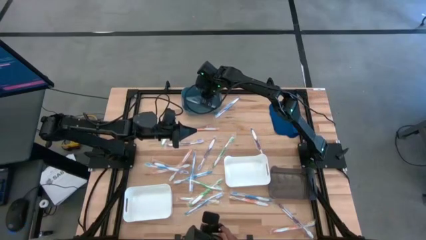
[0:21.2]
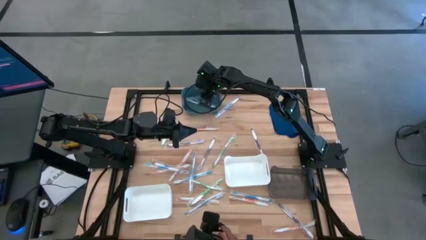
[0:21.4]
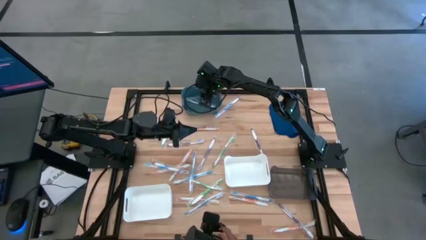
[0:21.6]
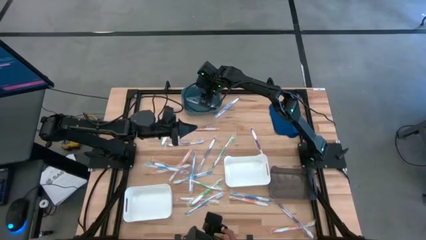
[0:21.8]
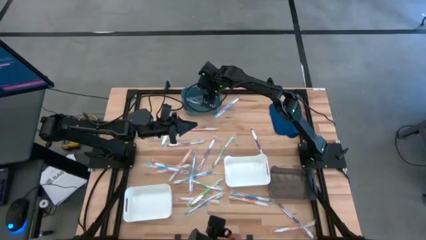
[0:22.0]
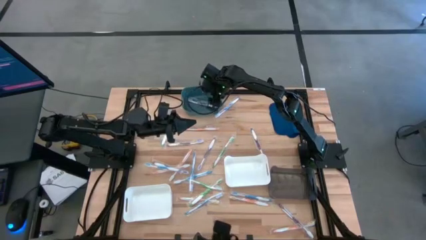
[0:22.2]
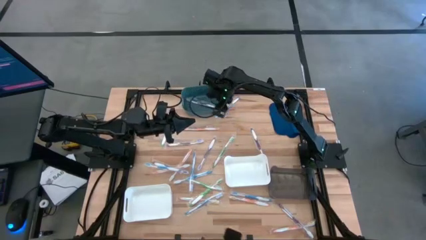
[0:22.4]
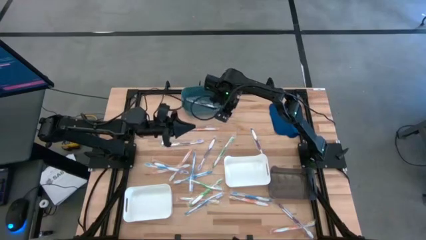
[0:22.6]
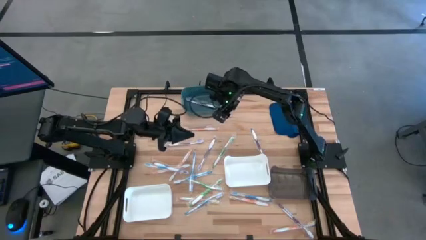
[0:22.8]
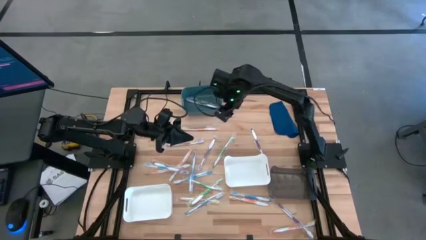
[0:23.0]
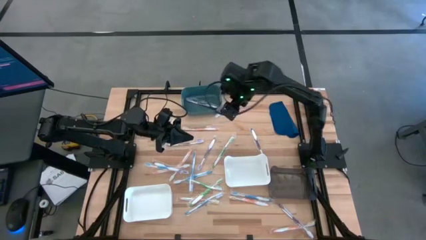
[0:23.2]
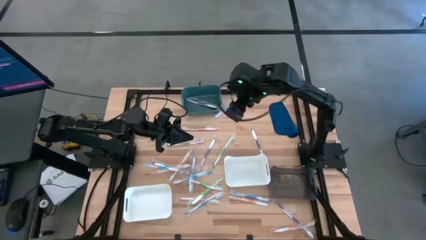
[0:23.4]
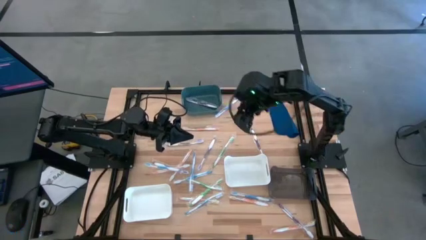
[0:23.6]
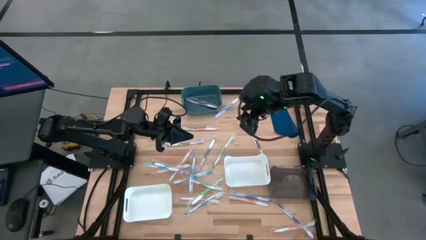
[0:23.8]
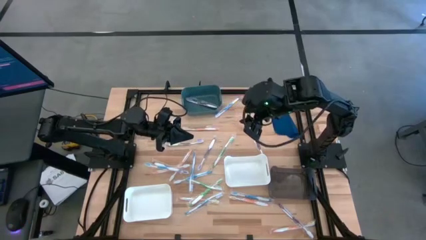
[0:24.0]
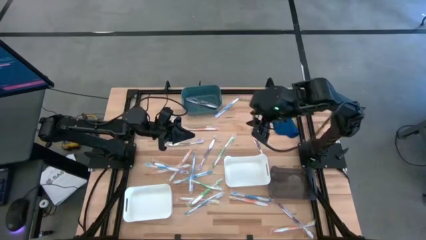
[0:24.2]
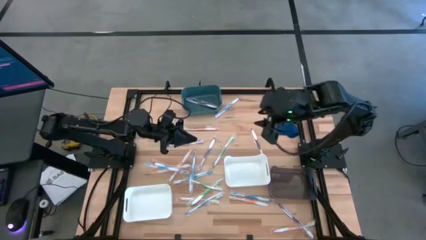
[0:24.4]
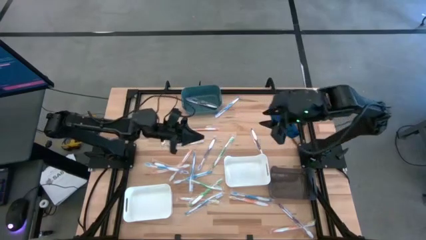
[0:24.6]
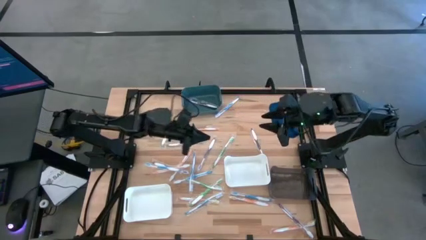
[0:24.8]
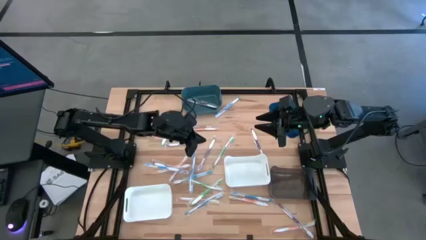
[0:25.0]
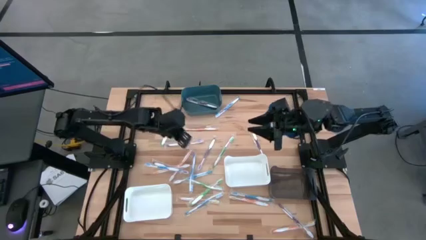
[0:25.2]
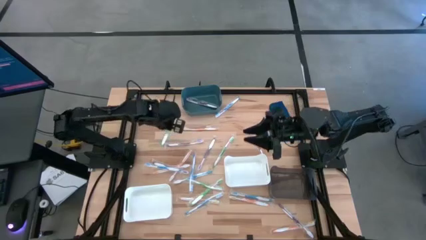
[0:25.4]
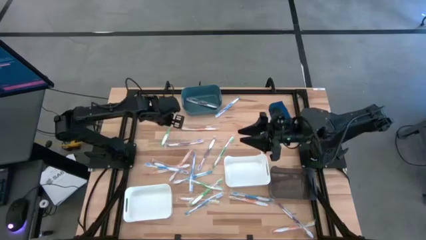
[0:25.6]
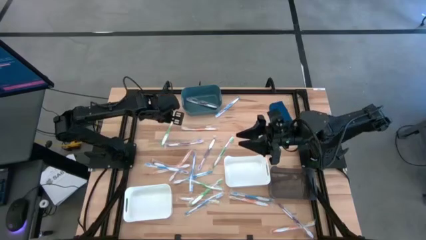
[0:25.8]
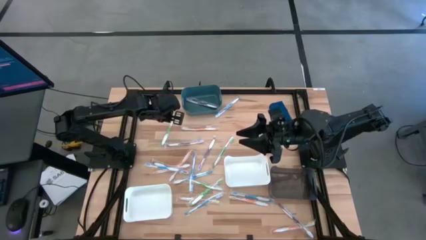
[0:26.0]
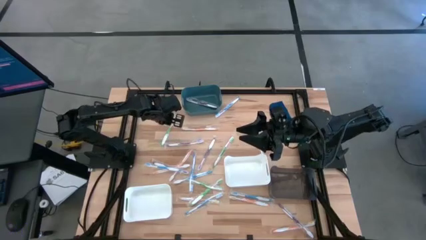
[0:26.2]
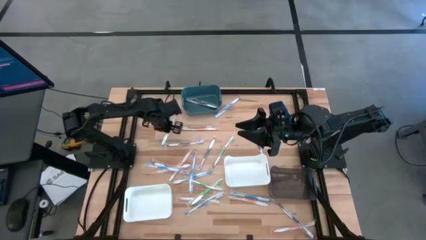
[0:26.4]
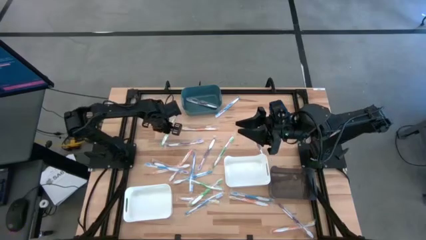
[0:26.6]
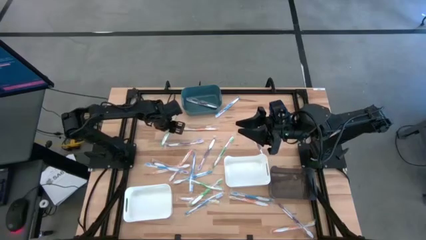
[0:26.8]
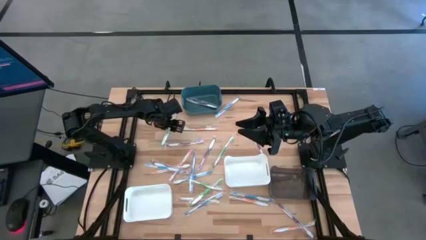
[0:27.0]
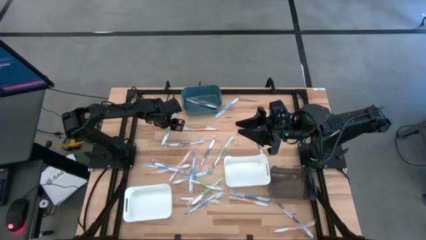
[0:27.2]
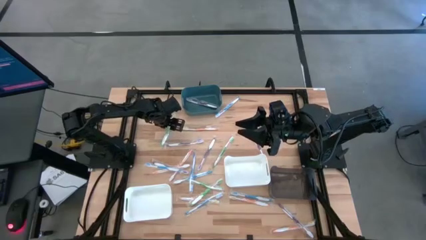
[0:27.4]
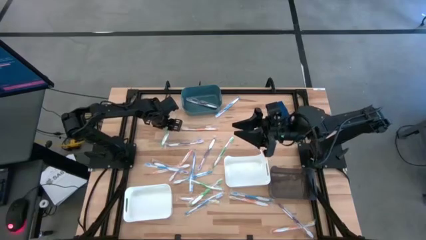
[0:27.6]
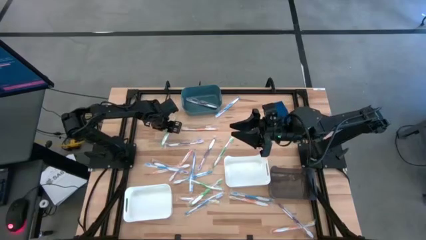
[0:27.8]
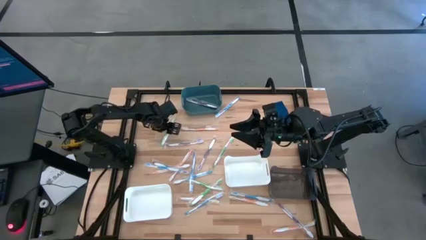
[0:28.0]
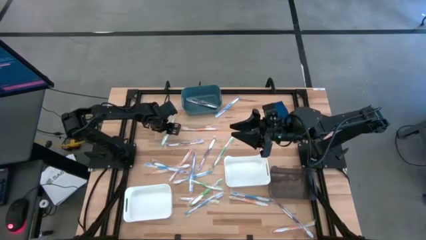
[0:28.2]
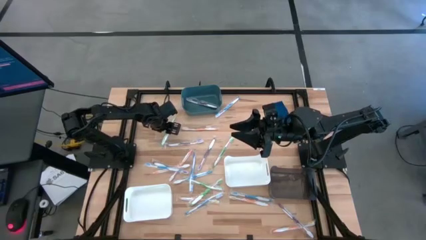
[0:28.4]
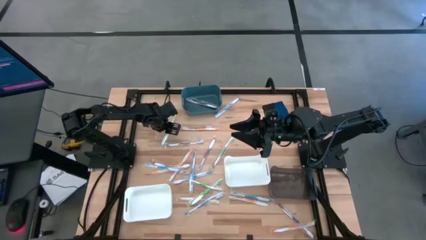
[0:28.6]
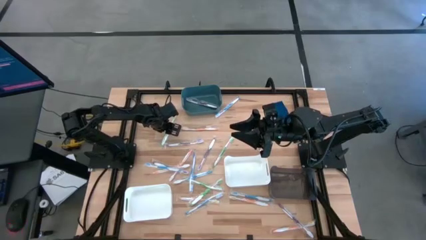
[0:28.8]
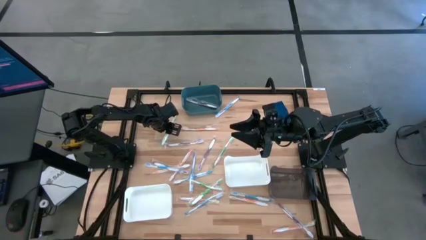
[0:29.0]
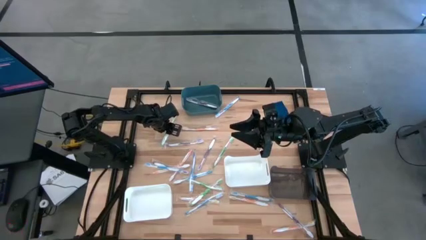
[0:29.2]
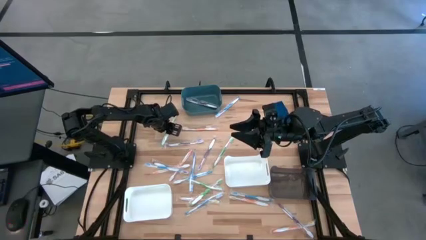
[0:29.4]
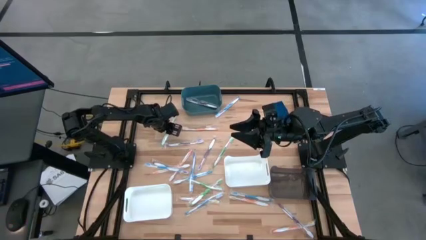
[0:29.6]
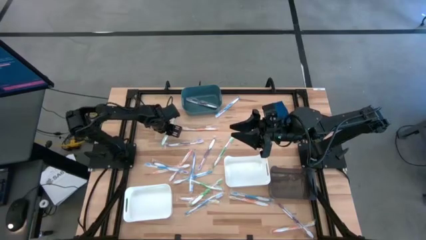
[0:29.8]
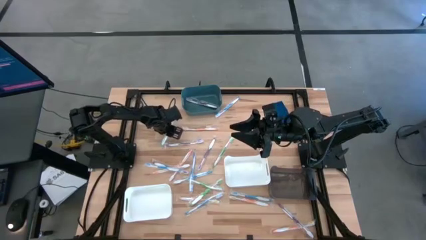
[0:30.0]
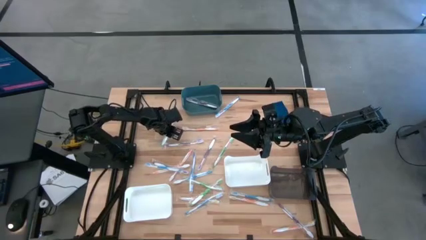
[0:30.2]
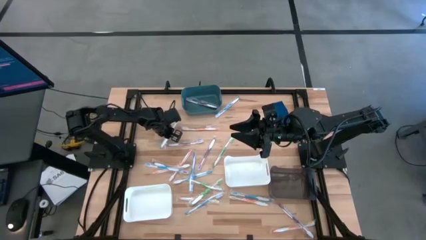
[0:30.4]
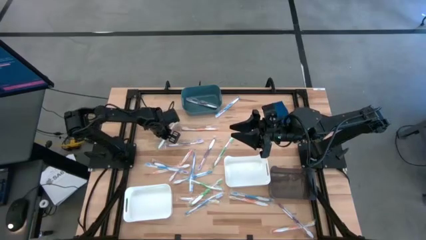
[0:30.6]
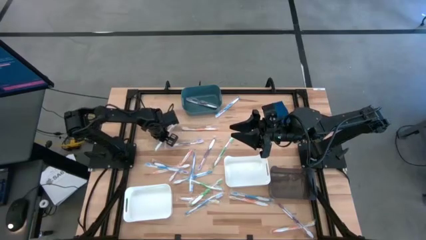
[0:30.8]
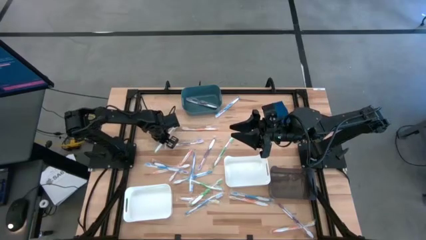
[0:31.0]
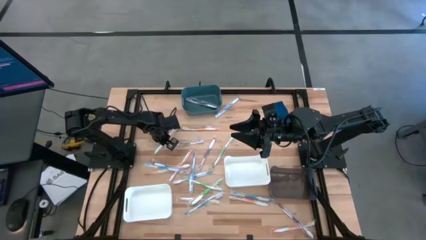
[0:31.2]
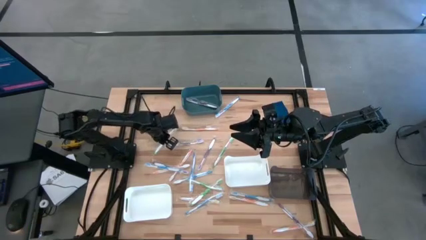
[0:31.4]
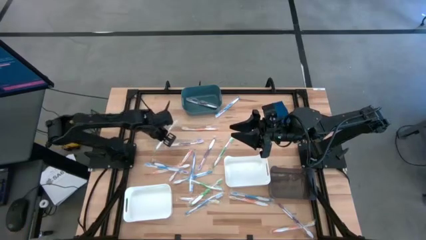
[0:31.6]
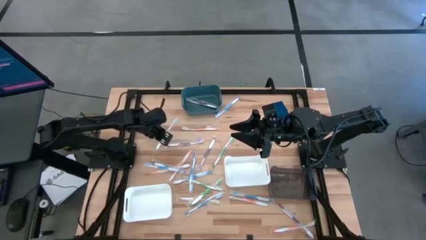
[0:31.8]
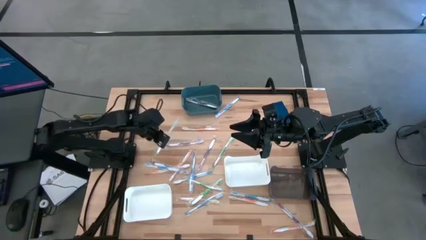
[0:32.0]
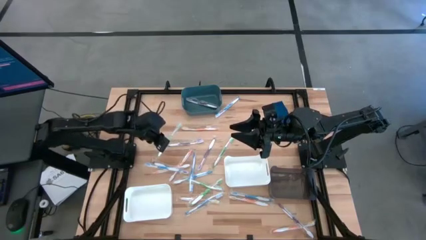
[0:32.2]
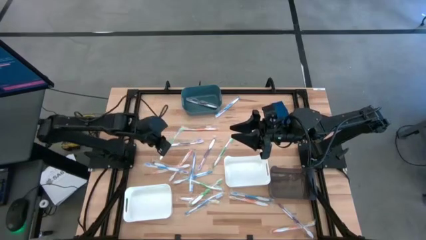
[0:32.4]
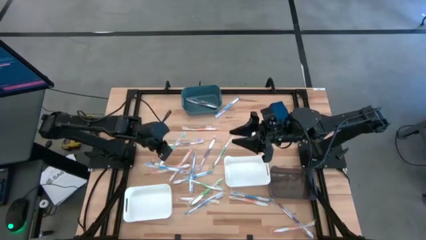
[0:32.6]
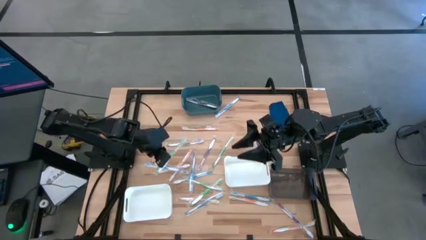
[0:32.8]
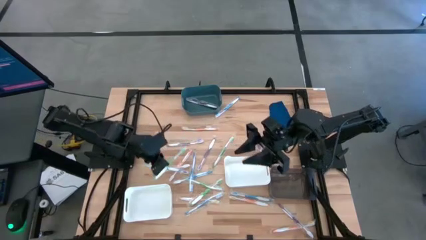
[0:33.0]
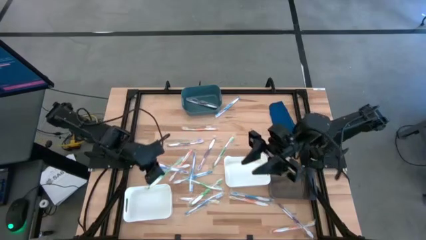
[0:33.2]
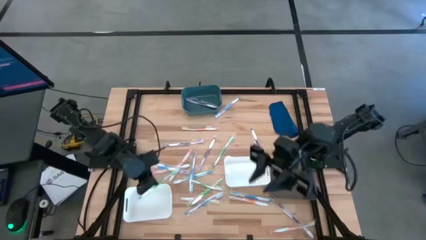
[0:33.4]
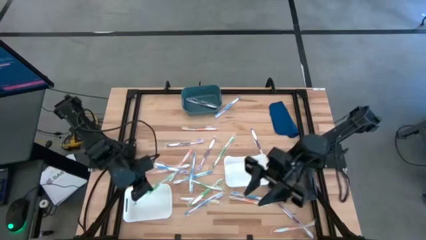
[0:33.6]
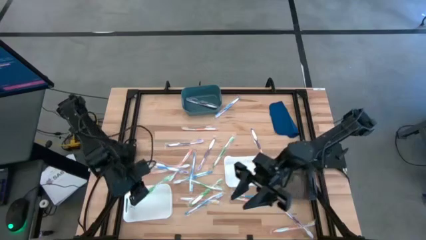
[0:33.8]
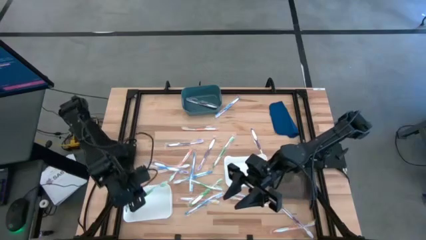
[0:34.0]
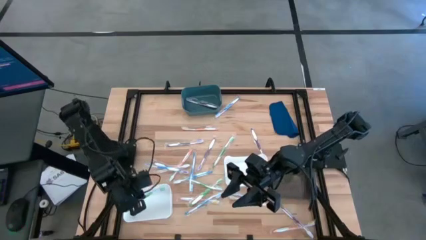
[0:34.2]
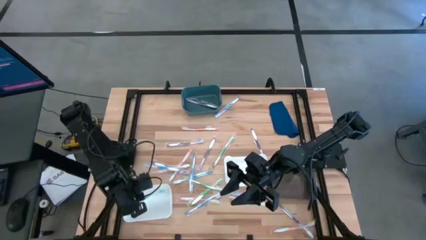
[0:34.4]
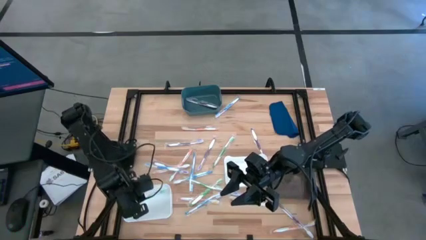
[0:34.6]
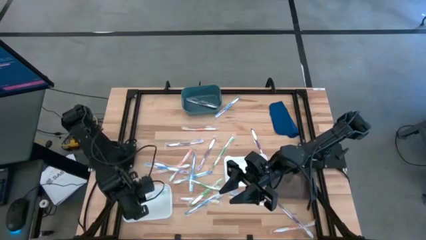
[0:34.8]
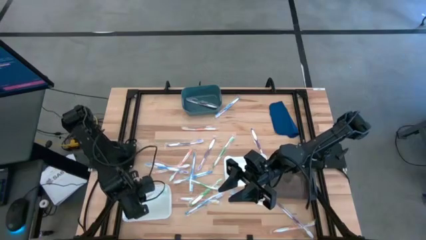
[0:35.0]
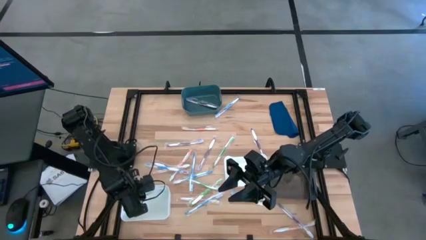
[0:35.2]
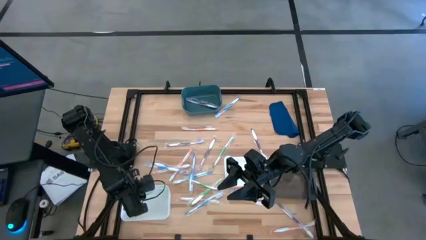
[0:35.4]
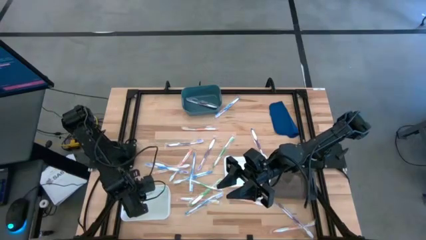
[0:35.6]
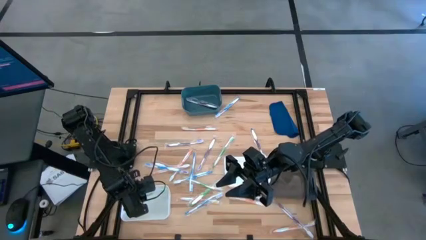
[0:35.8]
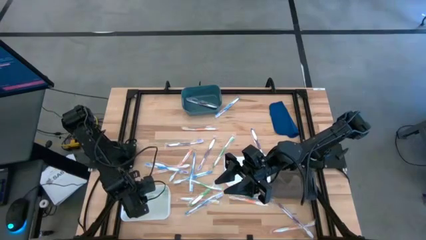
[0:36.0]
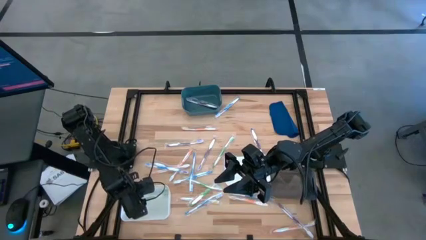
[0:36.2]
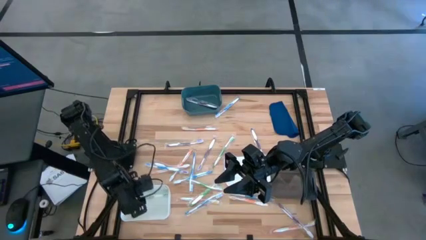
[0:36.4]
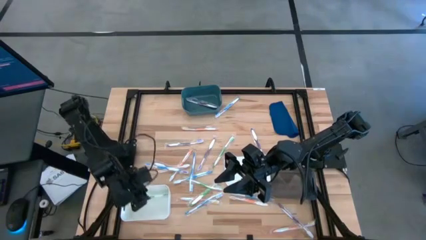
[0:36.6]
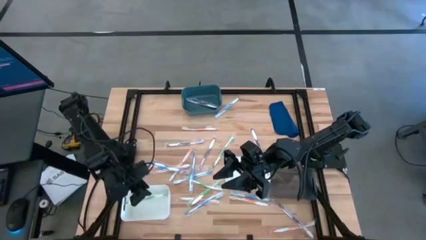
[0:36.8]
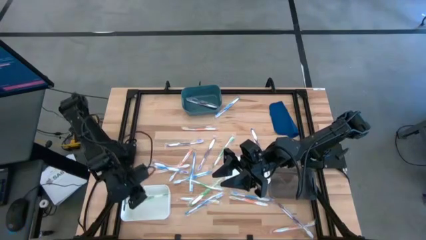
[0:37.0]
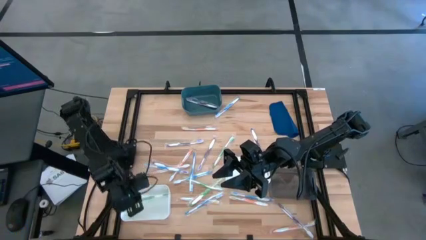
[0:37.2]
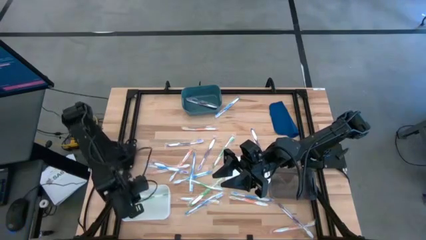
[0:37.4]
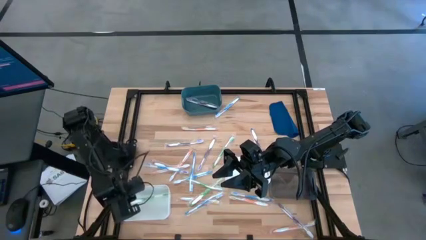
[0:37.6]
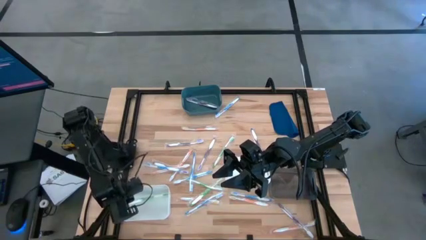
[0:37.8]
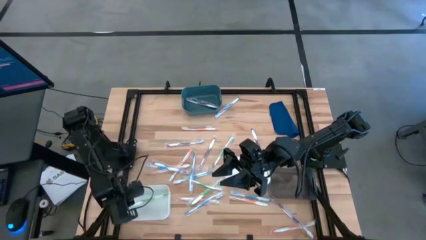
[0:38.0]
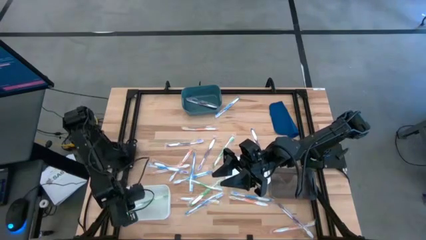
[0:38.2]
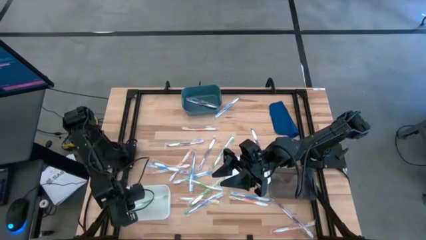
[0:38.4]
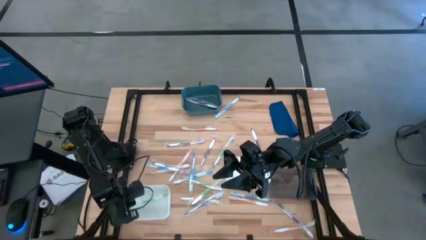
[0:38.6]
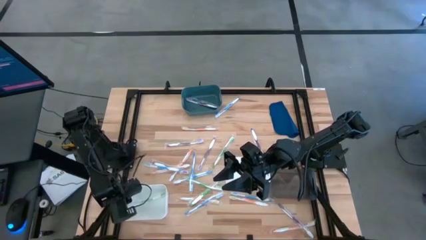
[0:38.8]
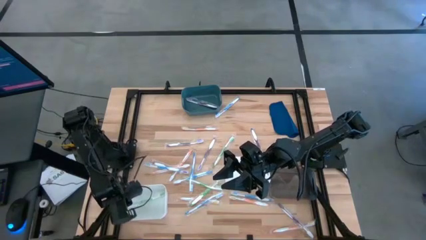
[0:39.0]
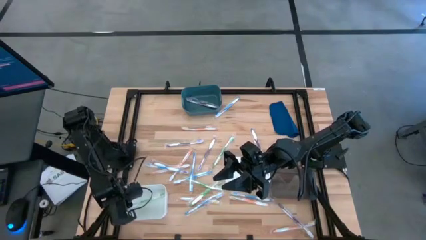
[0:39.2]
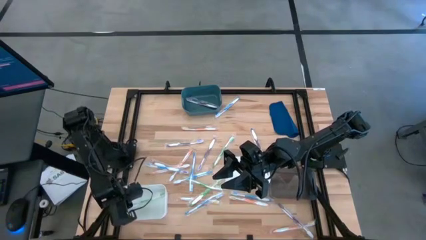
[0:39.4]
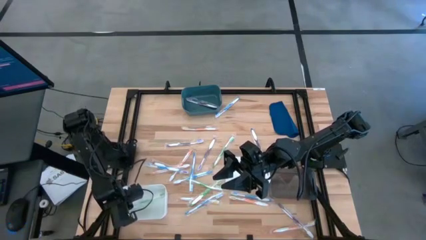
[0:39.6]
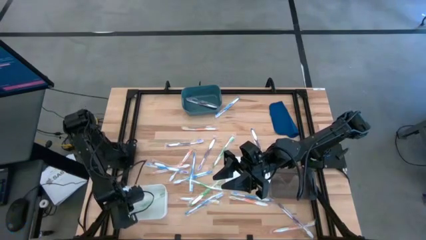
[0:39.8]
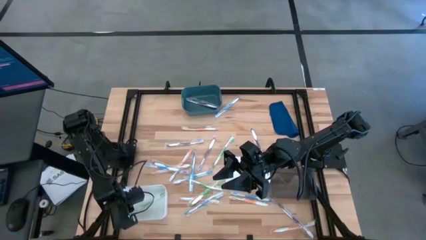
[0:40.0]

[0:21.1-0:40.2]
Task: Pick & Place Toothbrushes
Put the green toothbrush into the bottom white bin
